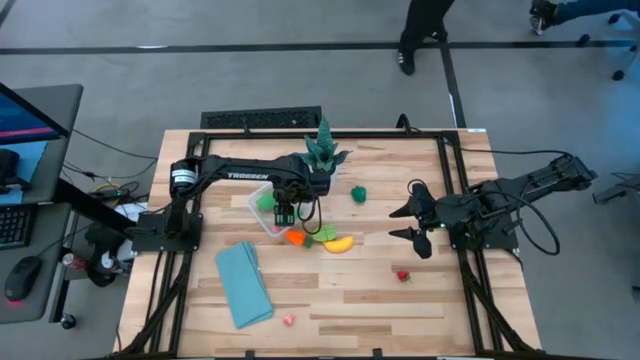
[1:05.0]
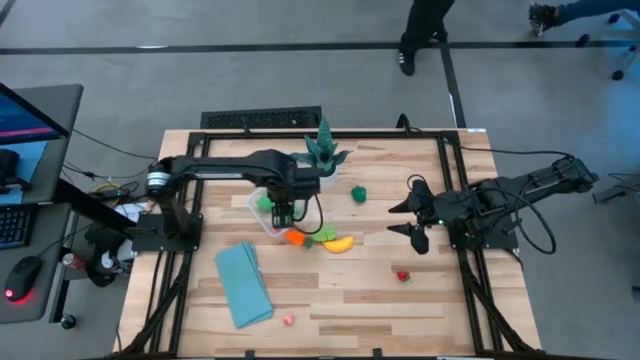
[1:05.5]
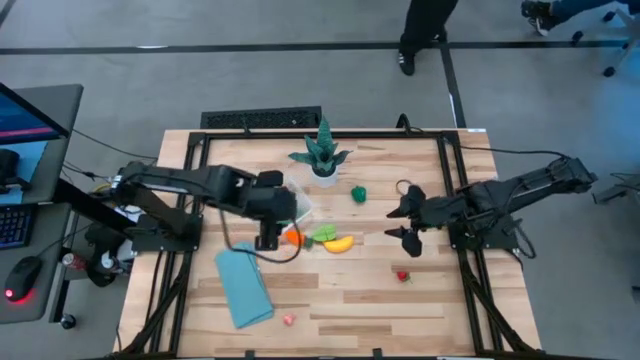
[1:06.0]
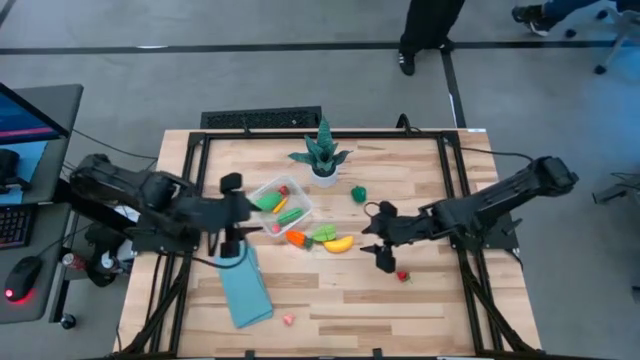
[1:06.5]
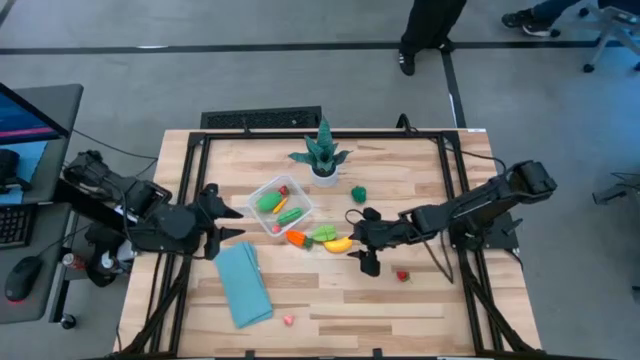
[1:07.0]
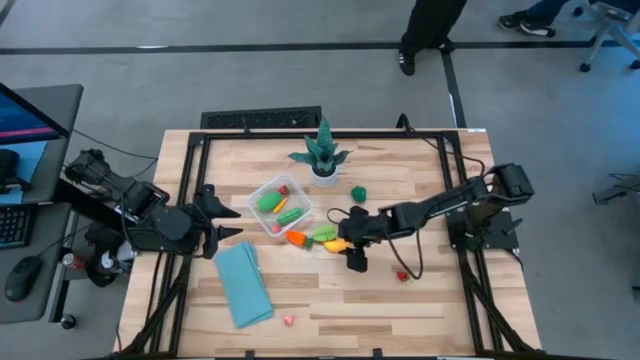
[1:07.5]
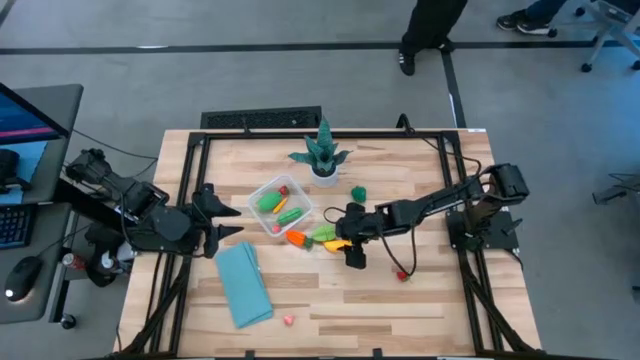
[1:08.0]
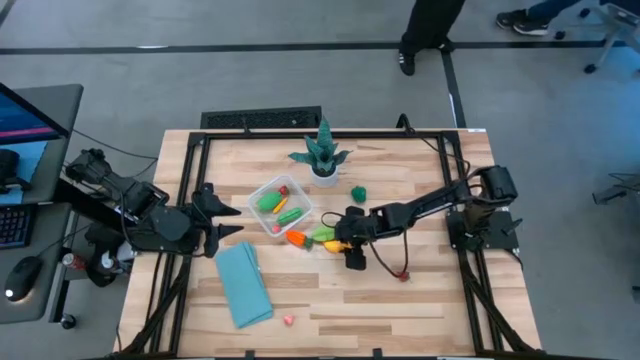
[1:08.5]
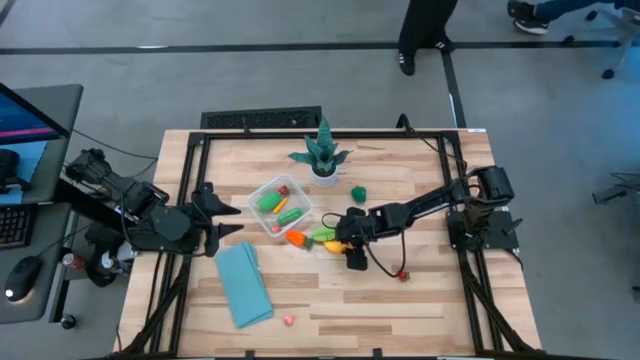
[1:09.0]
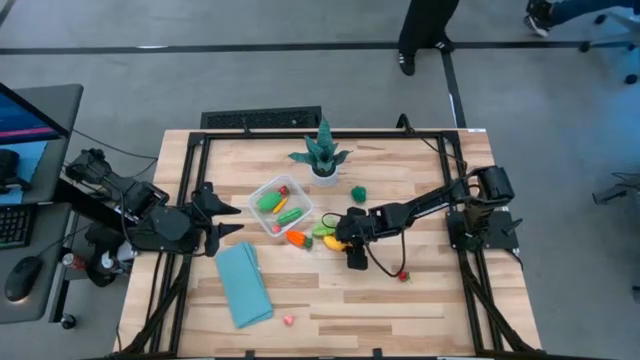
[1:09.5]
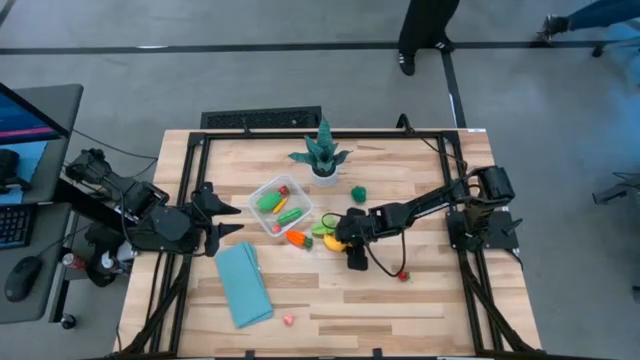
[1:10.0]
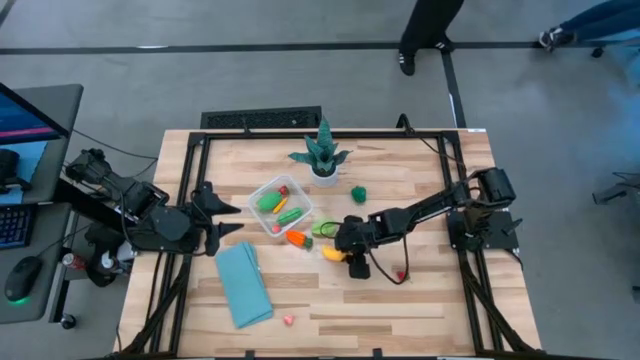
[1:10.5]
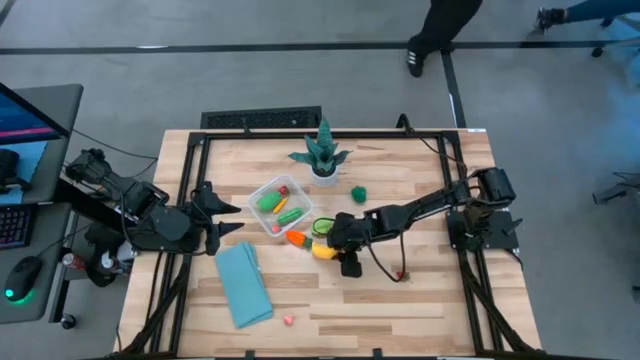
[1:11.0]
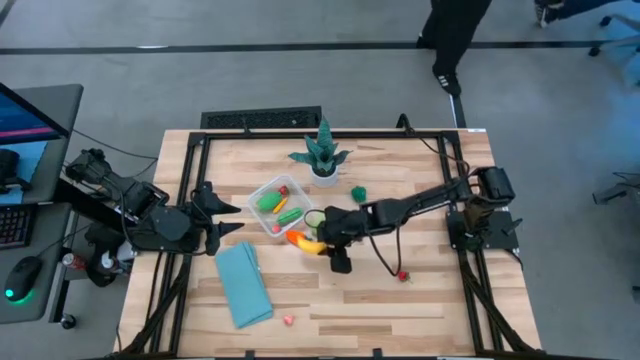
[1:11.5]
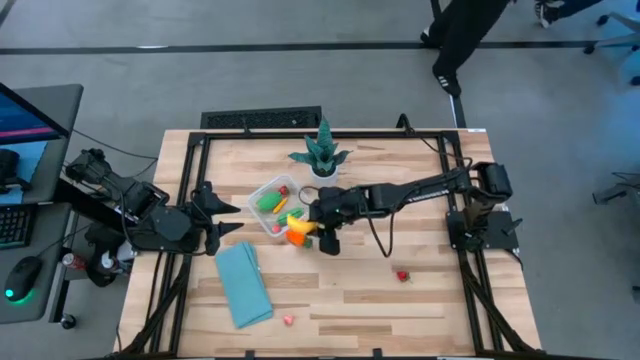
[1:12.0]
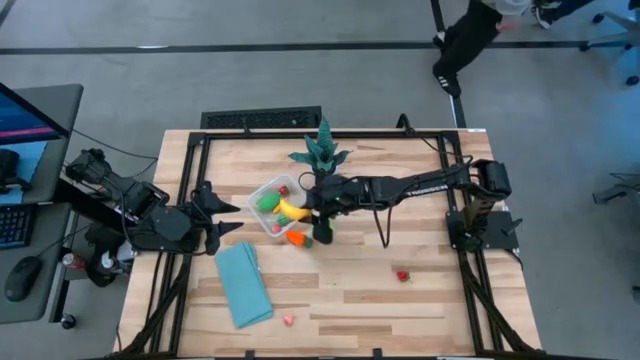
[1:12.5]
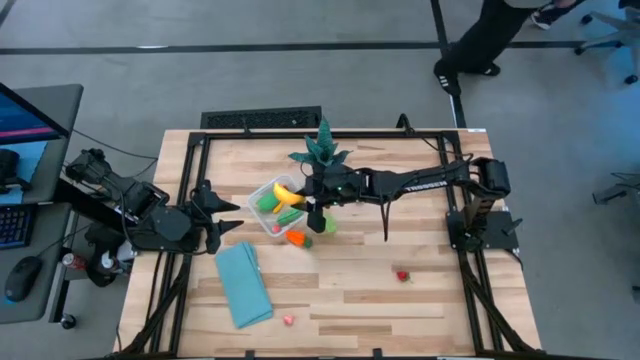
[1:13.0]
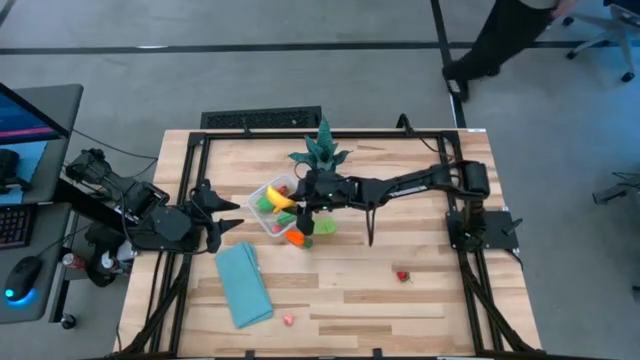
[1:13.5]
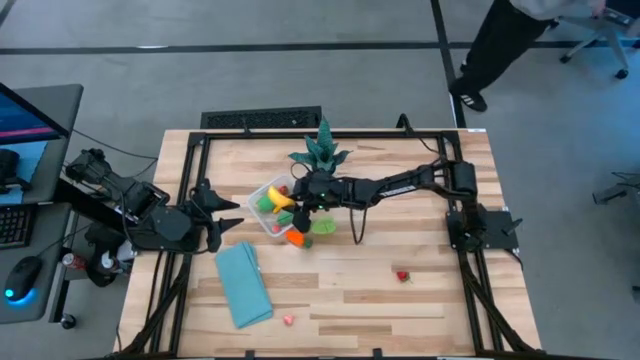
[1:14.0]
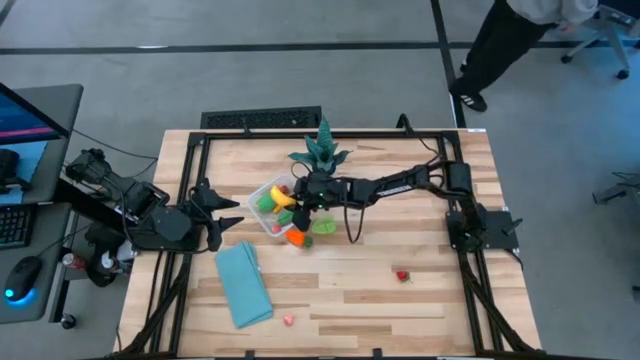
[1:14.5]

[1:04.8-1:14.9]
Task: Pick and placing Produce into tupperware
Put the yellow banana into the transparent container

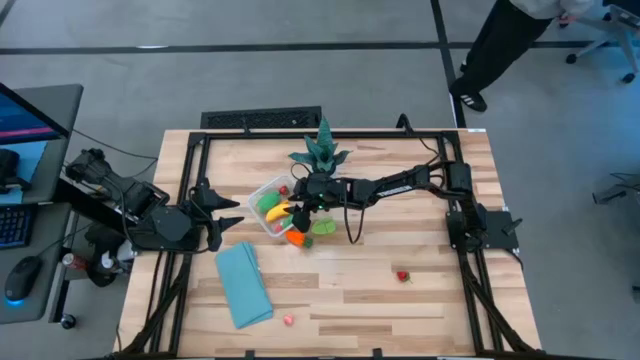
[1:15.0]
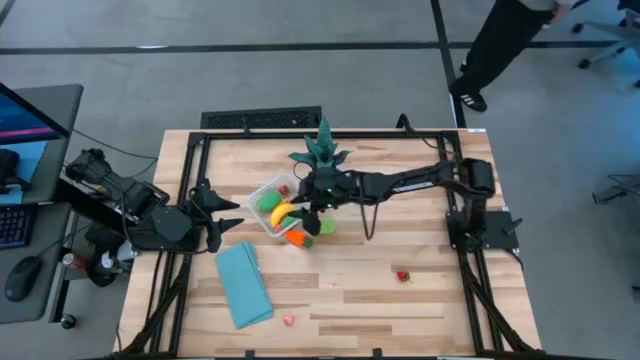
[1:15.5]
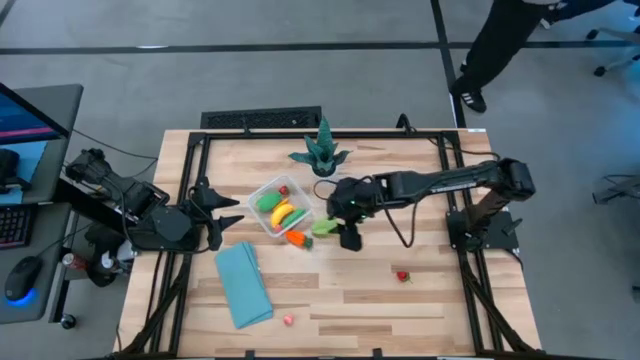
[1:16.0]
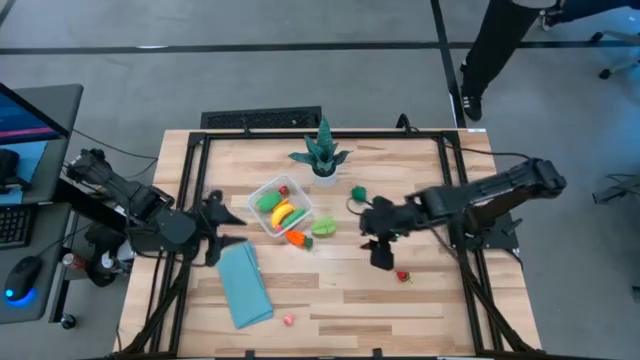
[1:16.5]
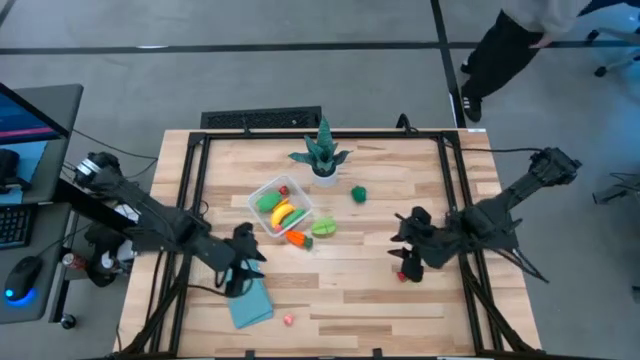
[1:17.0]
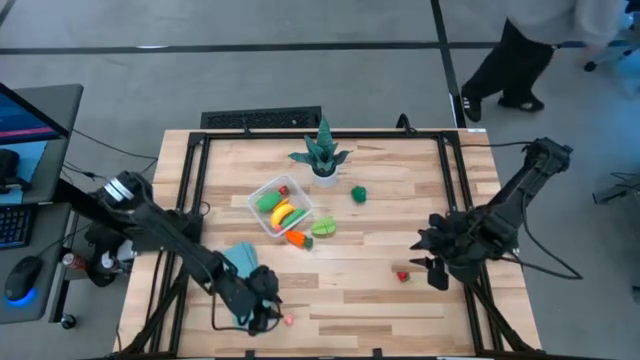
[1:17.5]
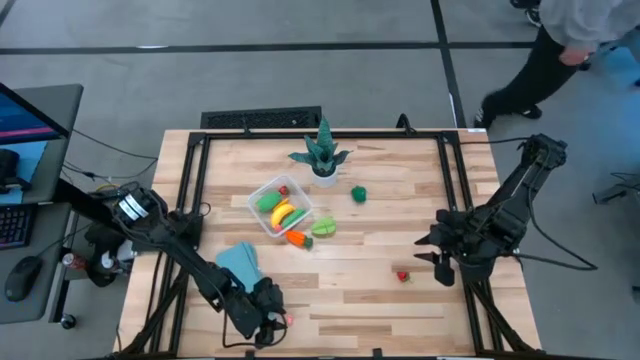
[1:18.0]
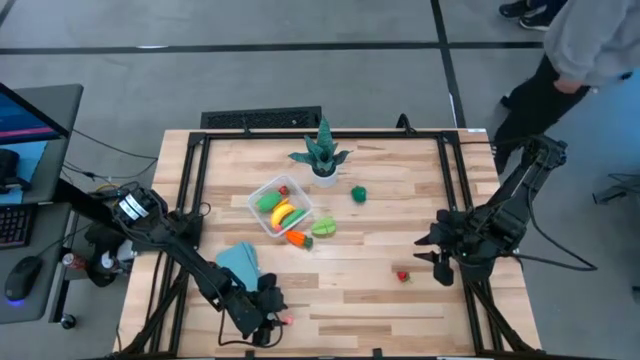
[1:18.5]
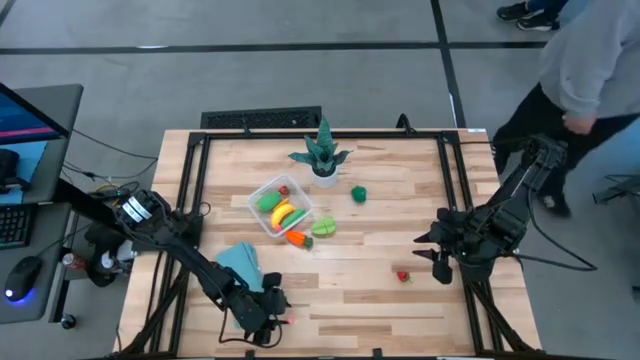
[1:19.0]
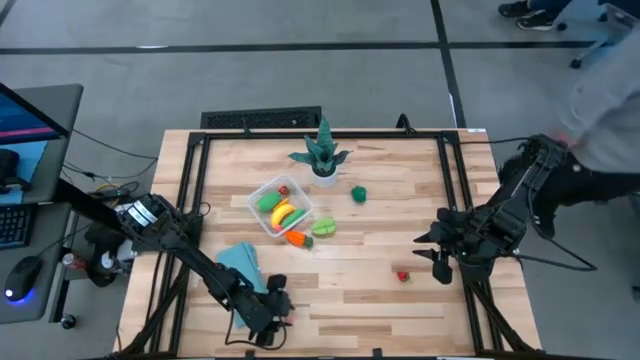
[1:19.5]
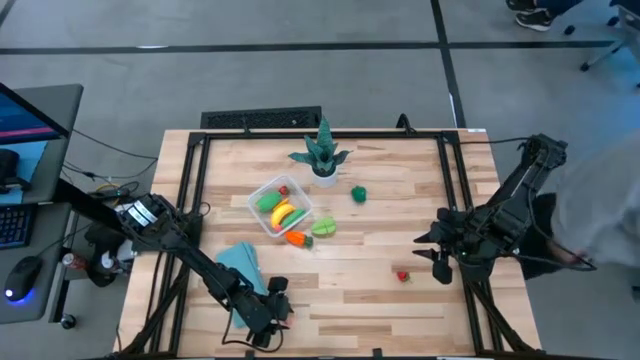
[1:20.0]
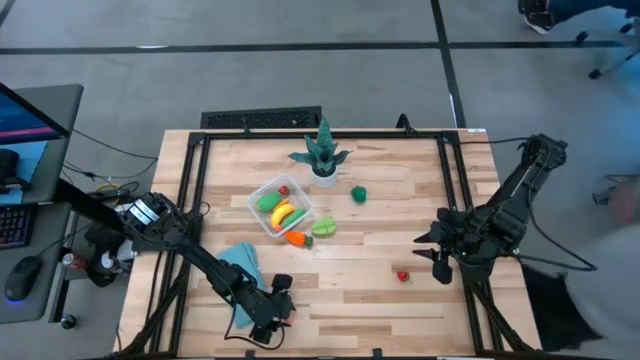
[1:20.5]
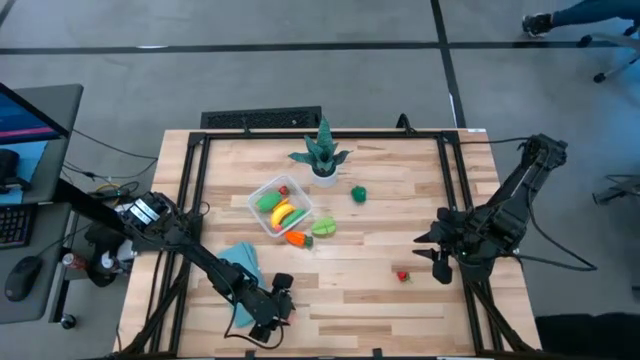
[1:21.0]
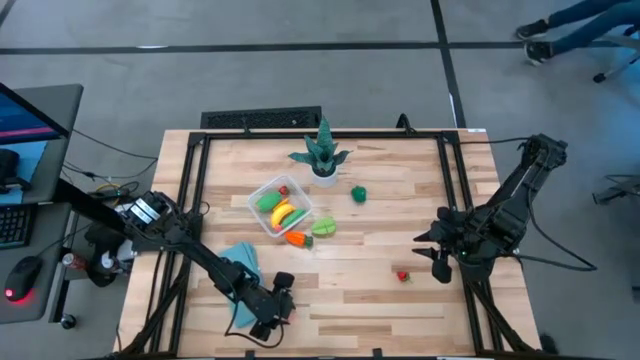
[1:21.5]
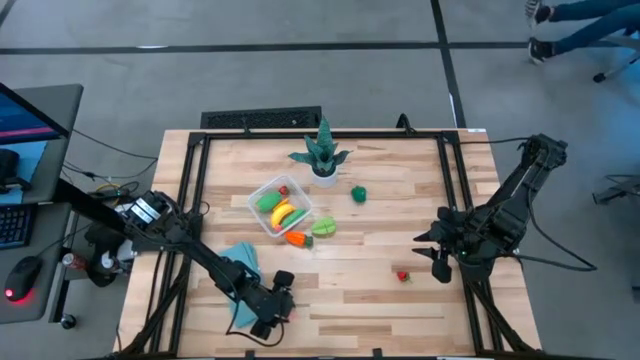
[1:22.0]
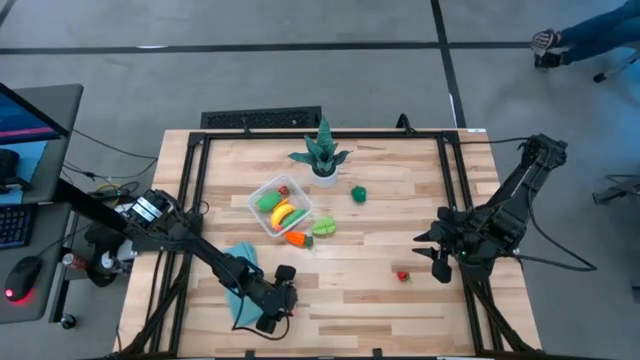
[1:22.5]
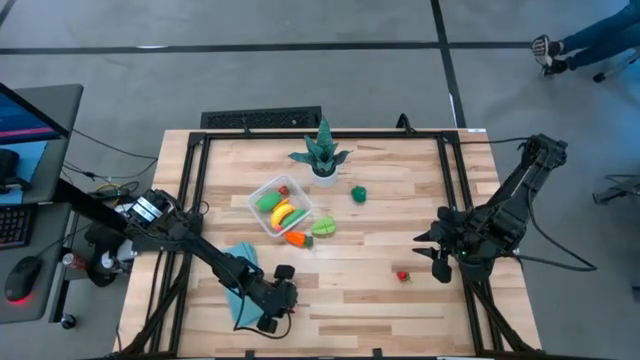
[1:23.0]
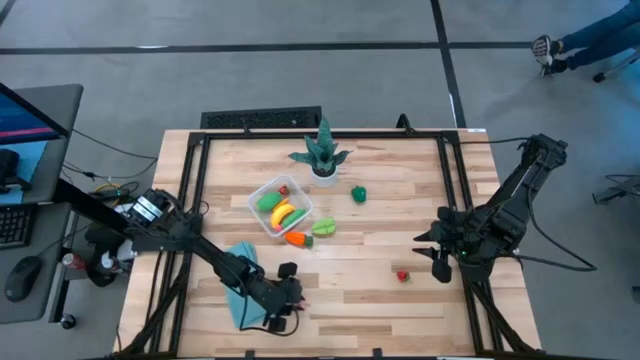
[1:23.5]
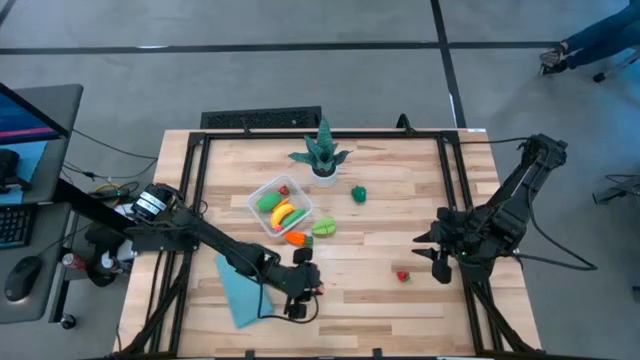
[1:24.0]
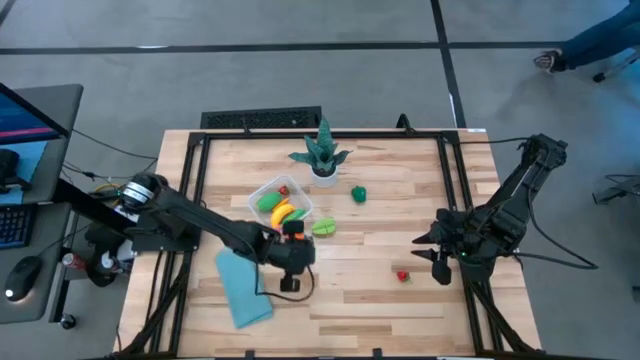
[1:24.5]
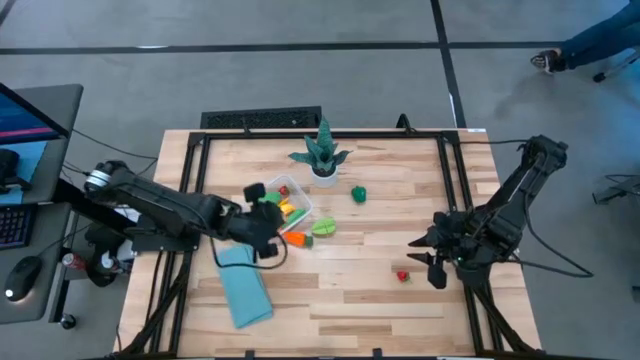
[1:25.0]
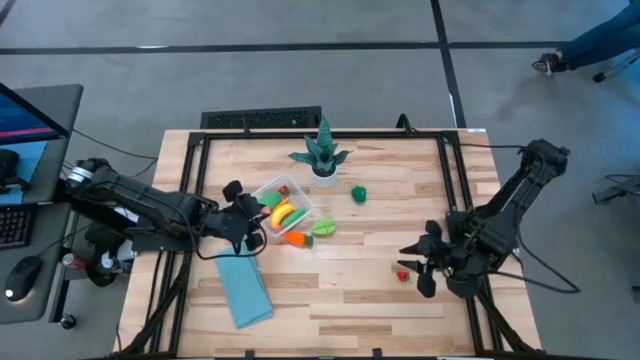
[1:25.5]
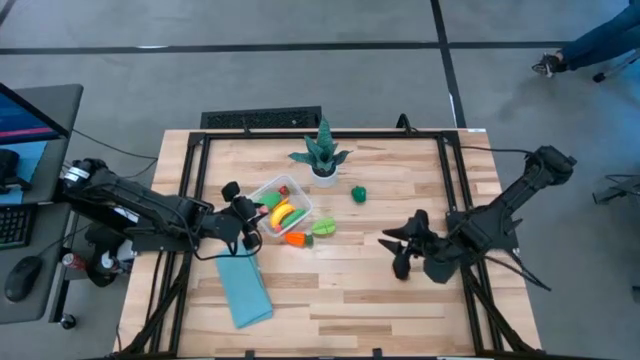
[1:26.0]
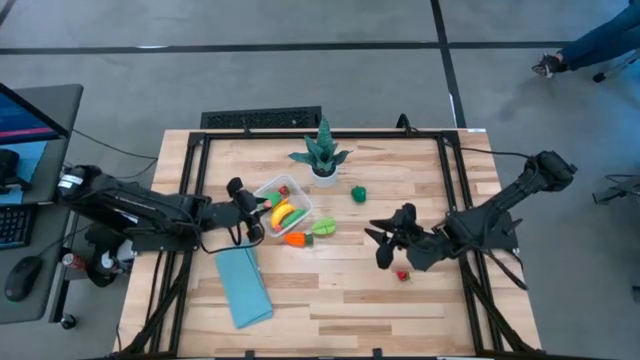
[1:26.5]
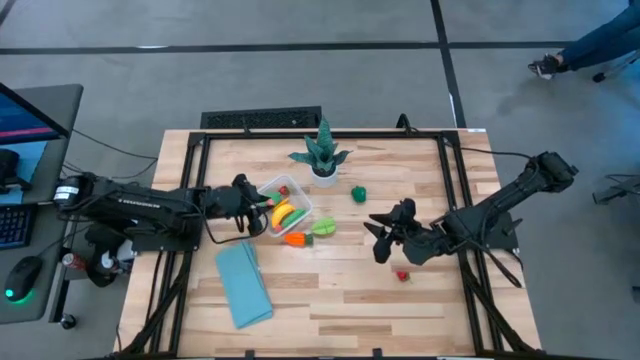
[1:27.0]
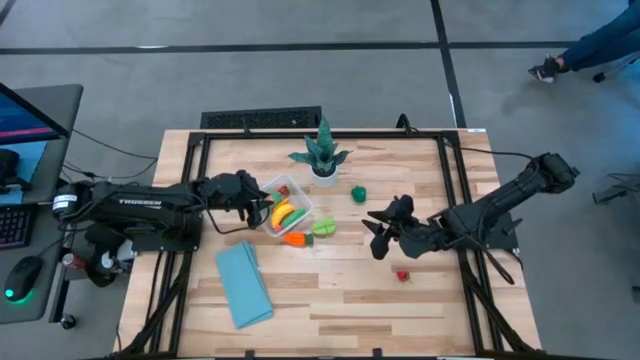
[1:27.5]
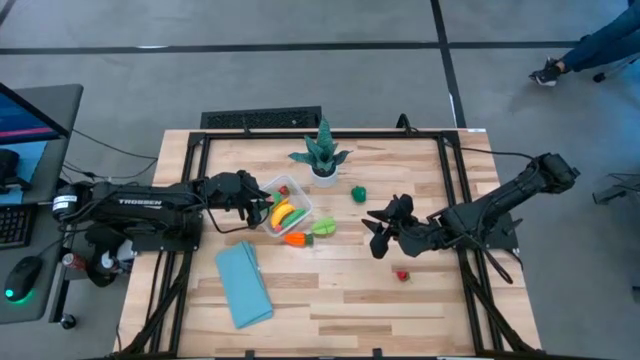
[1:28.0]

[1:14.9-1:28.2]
Put the pink peach into the transparent container
